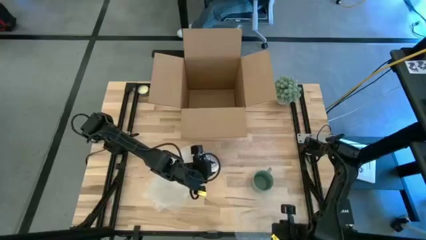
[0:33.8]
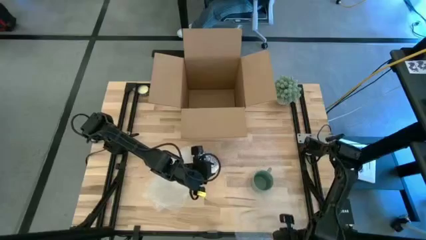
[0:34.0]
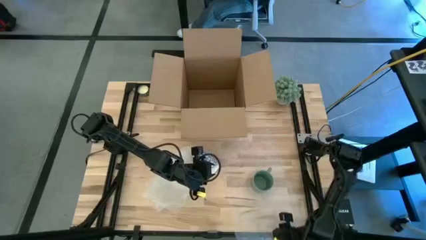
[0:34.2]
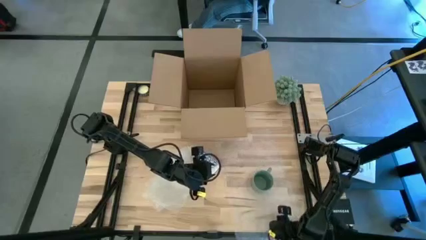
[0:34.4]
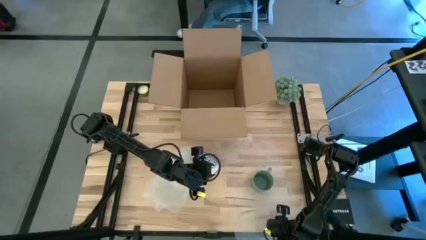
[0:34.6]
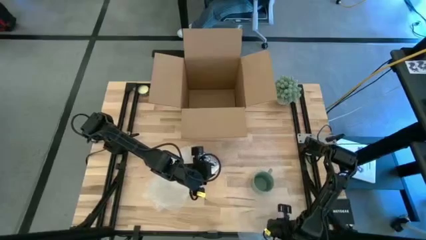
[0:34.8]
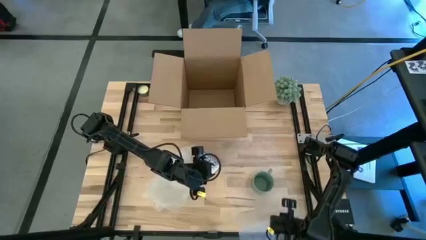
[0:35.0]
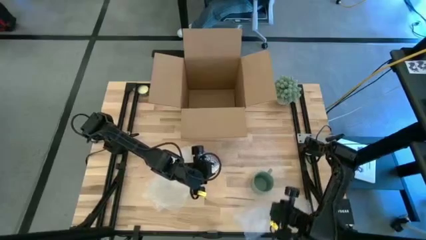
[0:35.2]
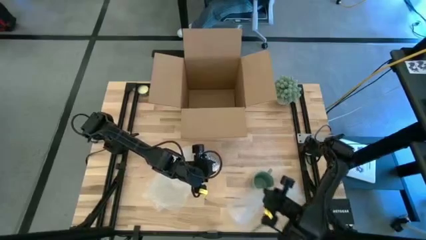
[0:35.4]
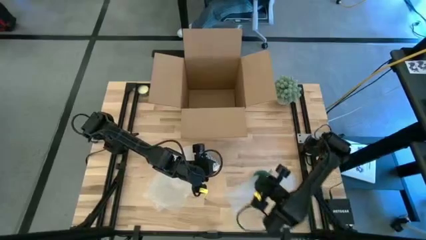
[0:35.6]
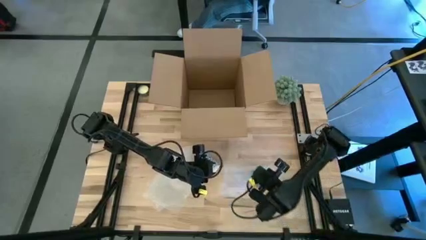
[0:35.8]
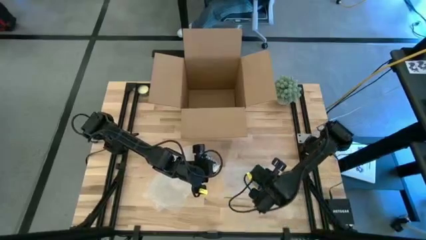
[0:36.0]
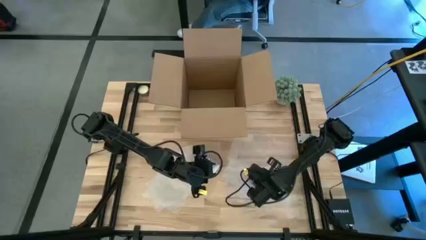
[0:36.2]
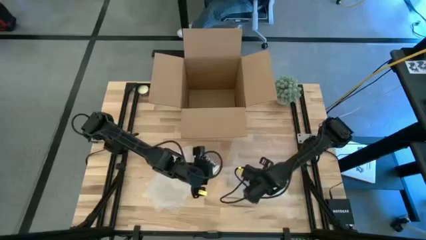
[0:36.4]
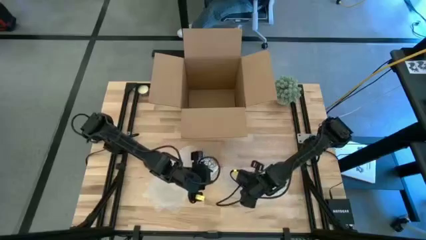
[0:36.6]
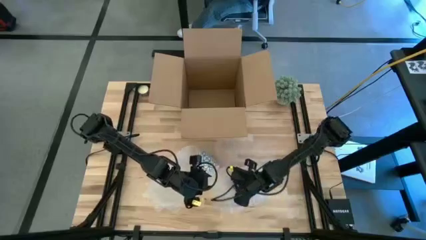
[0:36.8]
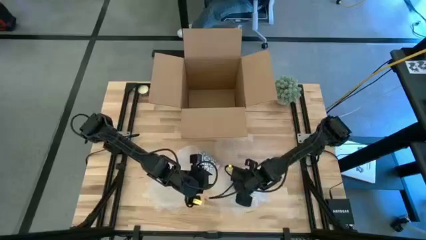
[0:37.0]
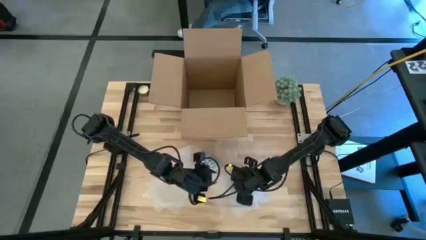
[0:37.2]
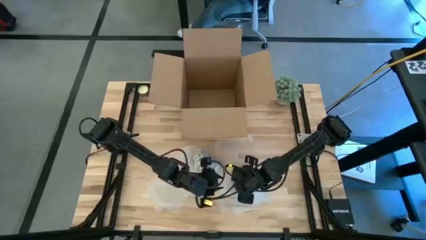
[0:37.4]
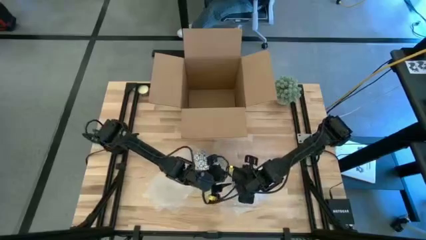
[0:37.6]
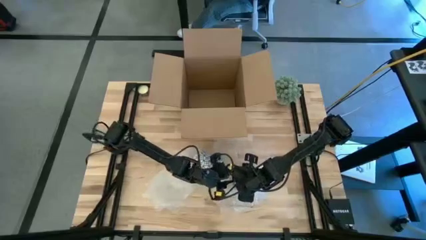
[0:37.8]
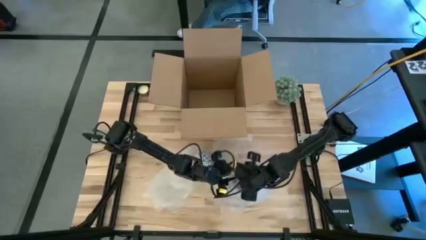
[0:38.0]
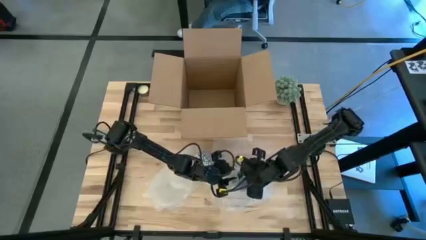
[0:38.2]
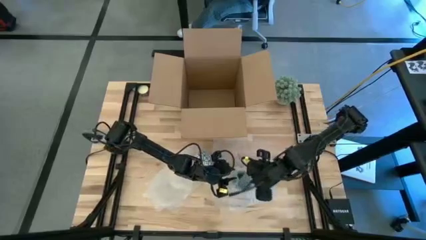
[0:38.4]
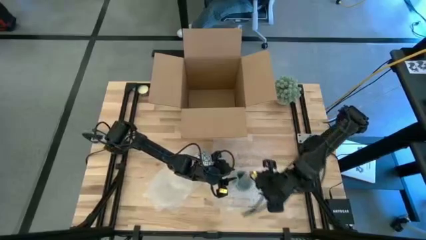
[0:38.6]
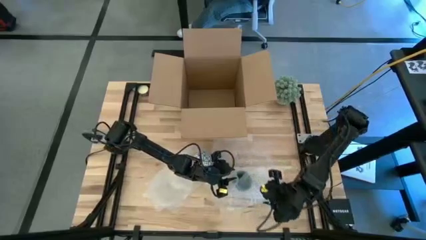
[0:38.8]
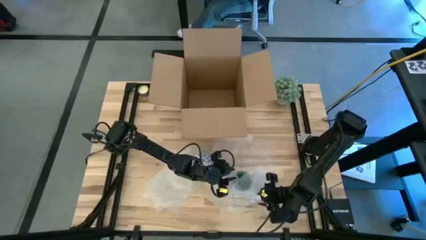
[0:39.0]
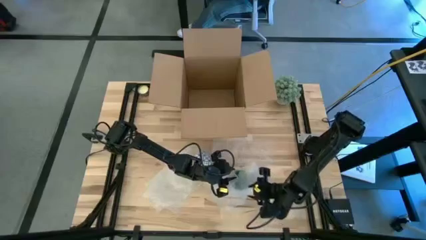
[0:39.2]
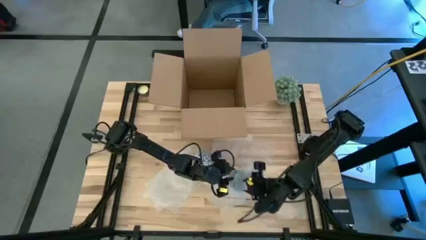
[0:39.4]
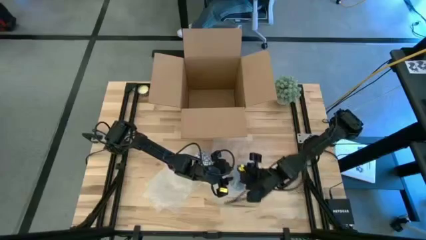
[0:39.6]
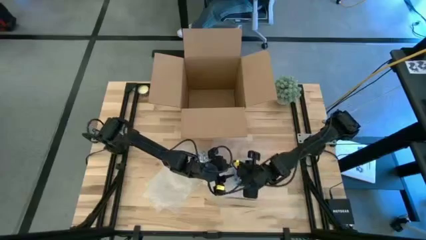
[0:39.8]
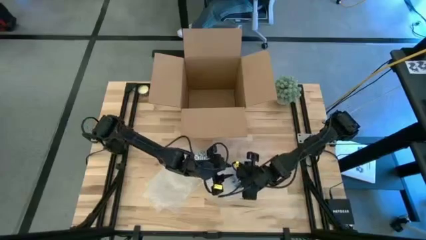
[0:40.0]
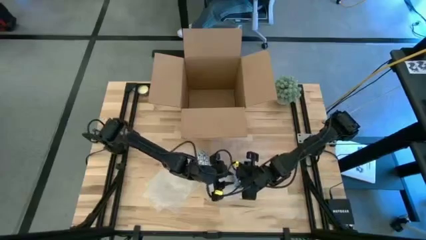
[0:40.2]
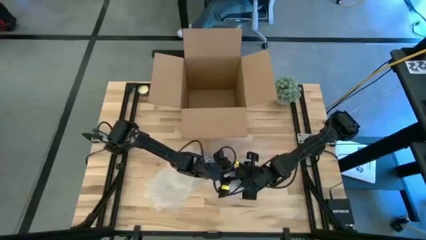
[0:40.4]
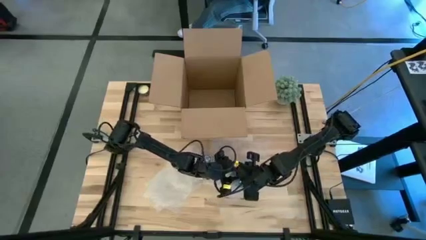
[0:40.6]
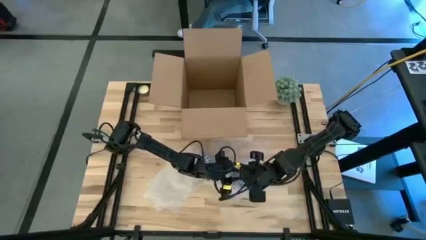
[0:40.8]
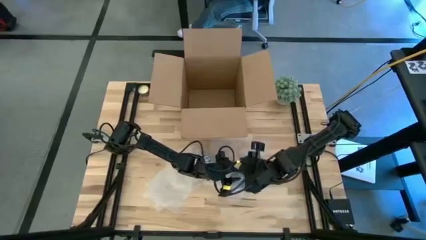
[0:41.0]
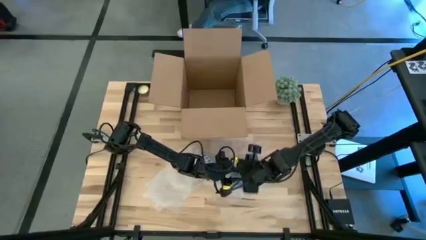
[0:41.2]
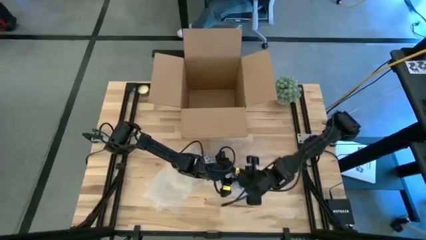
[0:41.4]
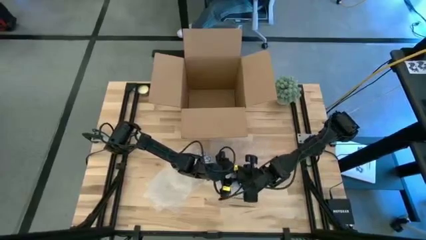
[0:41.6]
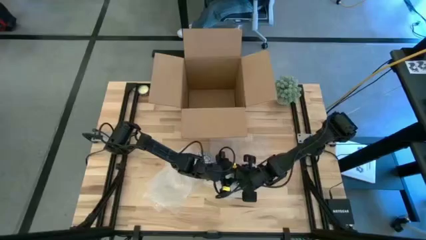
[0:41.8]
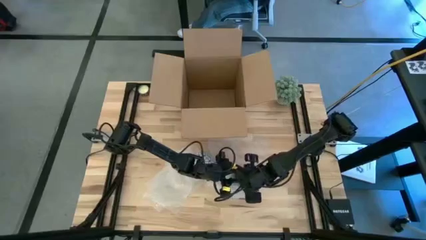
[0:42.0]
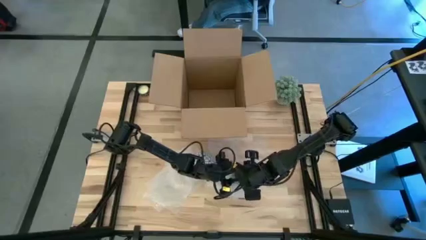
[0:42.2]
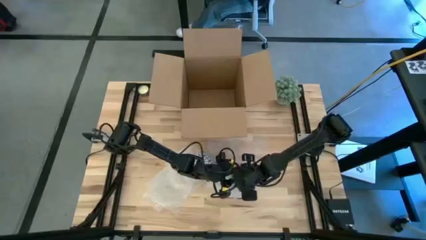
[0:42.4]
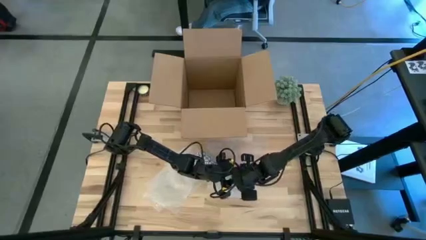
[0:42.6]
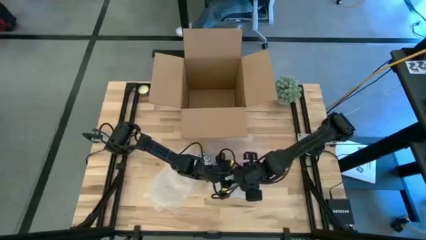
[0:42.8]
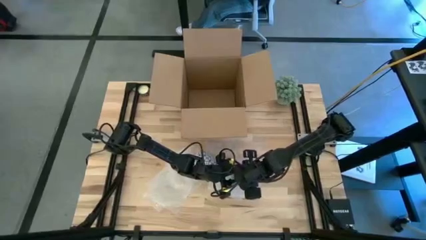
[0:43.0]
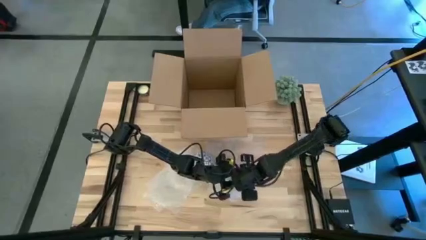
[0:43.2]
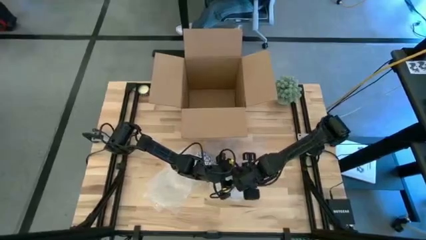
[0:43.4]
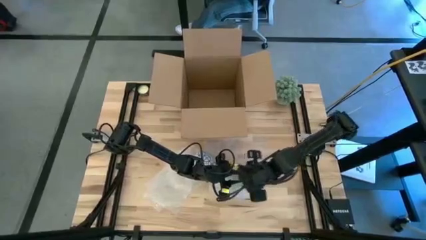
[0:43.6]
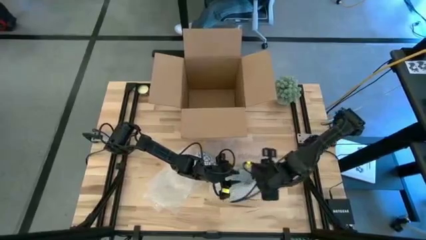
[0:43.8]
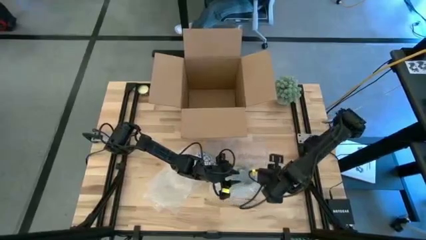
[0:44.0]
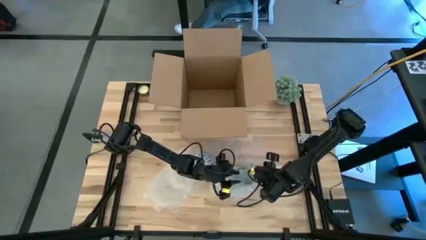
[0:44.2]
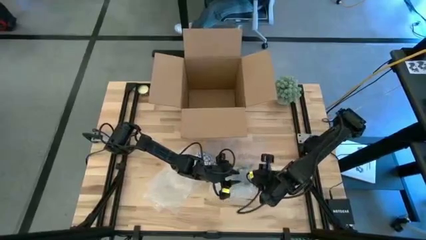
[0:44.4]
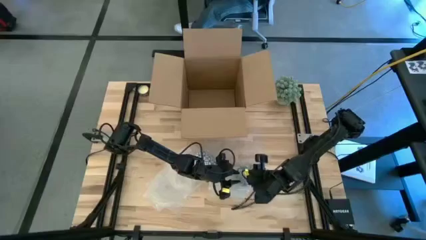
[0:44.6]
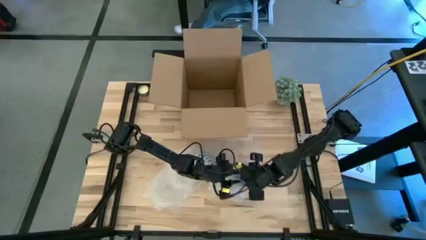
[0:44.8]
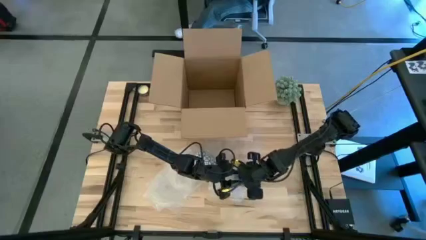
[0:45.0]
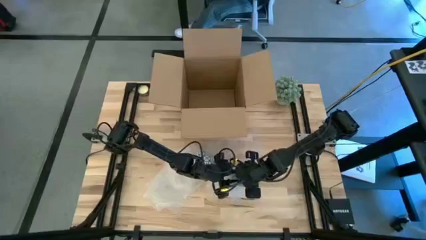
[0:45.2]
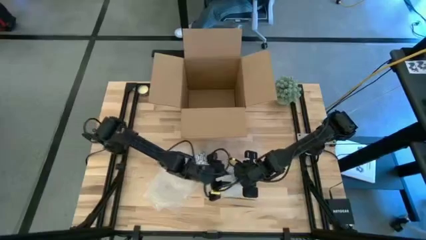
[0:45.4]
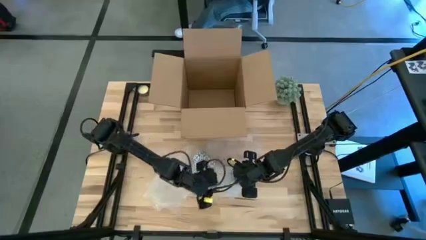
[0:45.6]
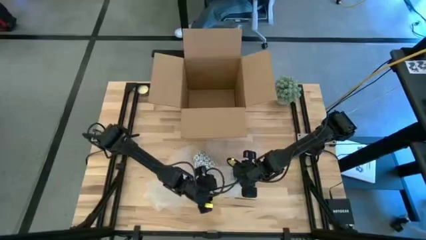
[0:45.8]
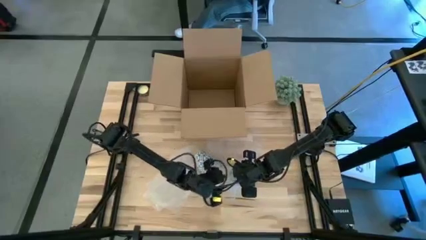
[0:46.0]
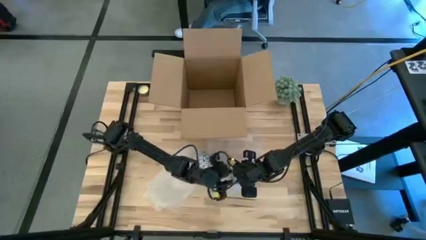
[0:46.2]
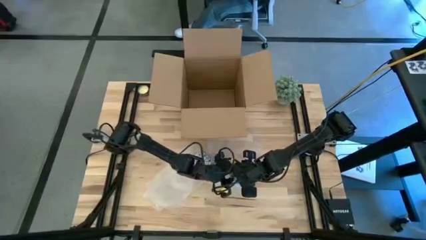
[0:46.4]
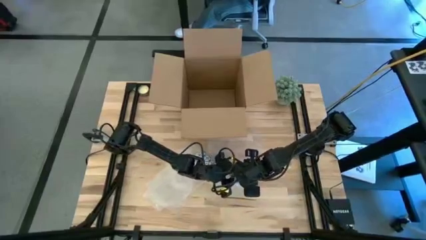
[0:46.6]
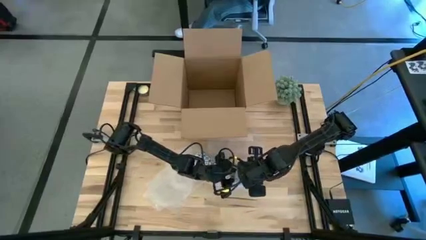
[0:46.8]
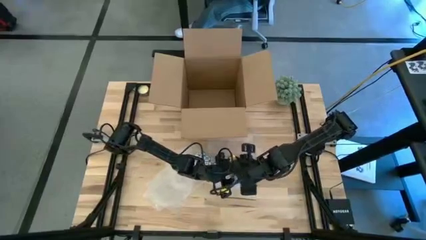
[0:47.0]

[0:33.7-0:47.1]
Task: wrap mug
Wrap the green mug with the right transparent bubble wrap

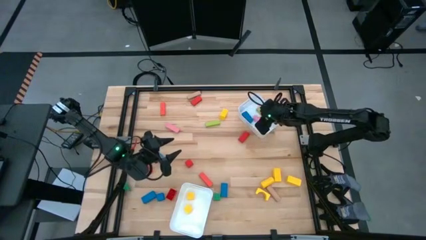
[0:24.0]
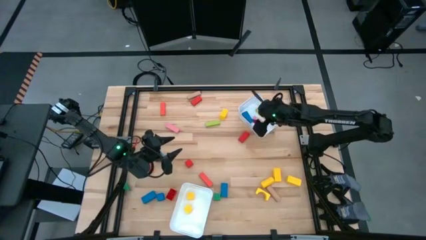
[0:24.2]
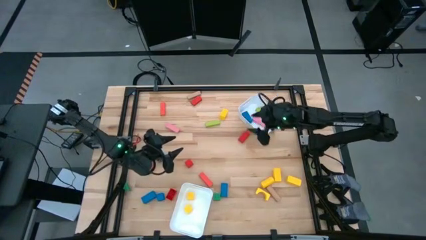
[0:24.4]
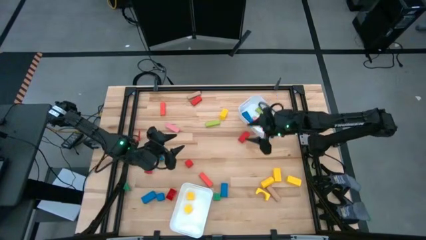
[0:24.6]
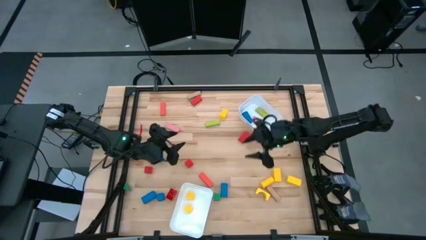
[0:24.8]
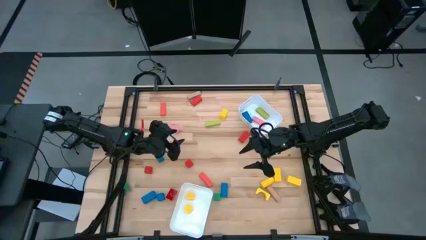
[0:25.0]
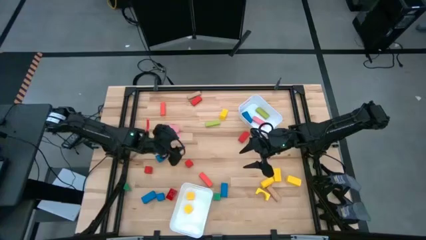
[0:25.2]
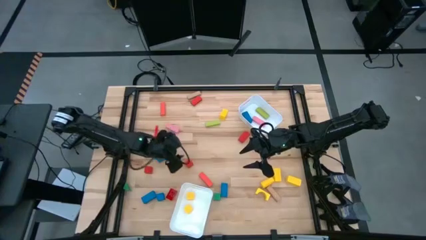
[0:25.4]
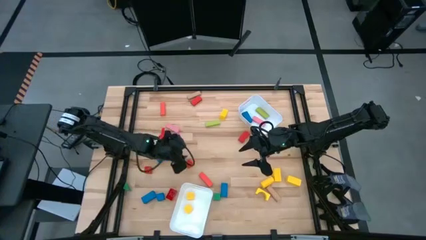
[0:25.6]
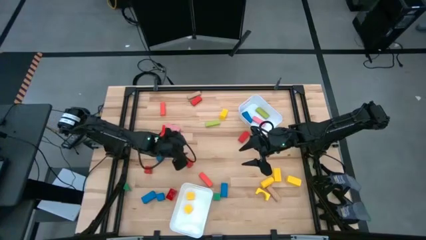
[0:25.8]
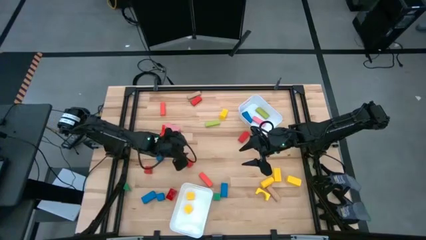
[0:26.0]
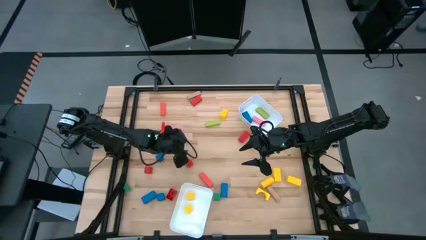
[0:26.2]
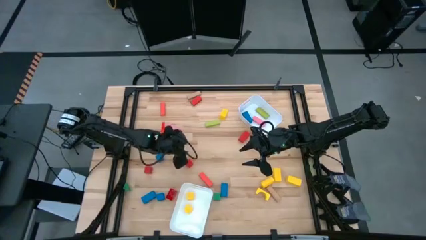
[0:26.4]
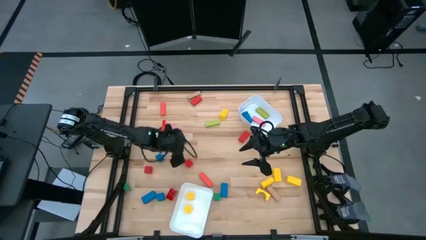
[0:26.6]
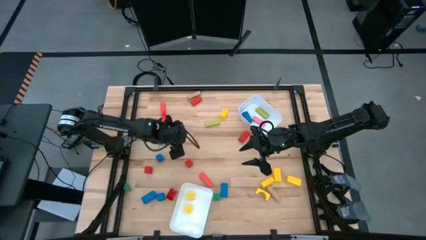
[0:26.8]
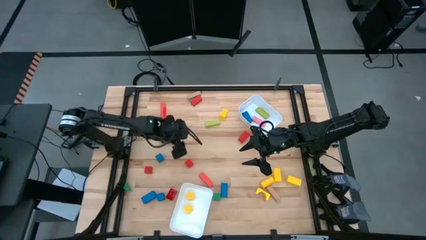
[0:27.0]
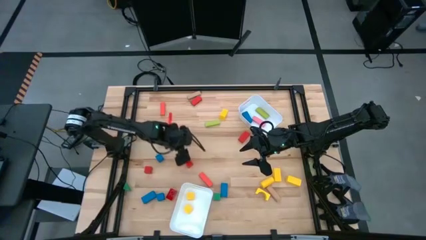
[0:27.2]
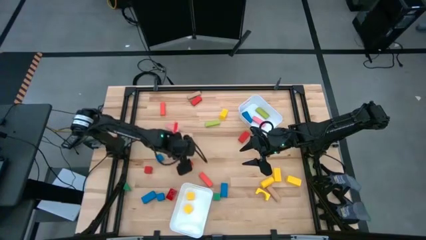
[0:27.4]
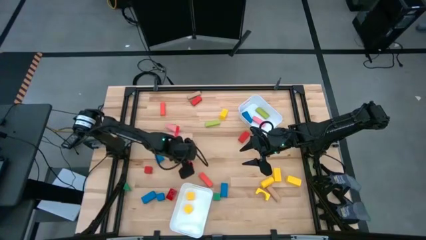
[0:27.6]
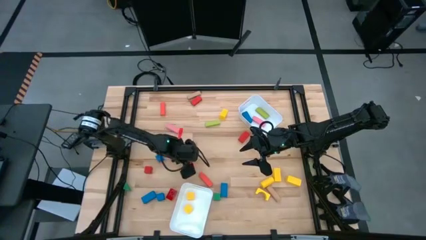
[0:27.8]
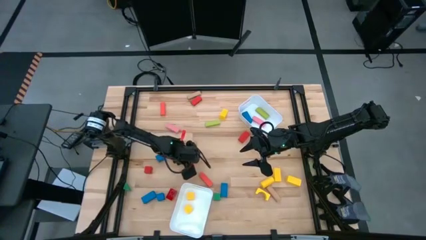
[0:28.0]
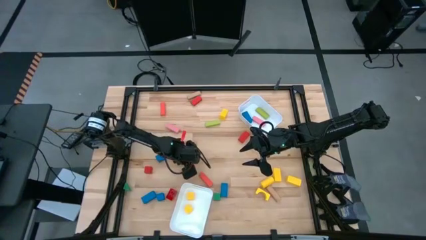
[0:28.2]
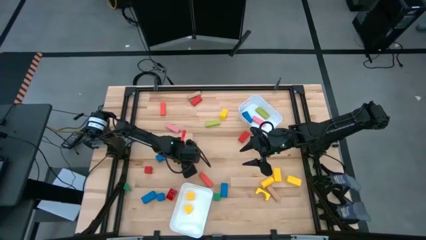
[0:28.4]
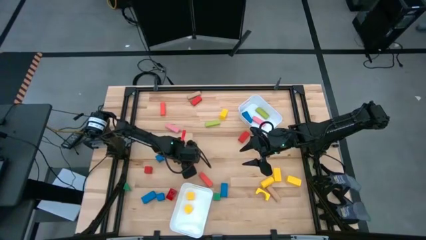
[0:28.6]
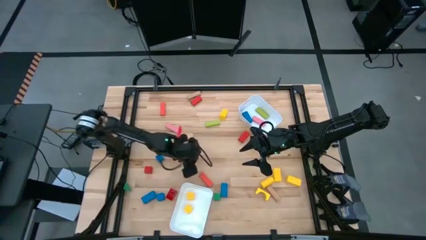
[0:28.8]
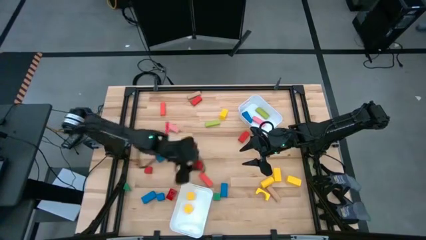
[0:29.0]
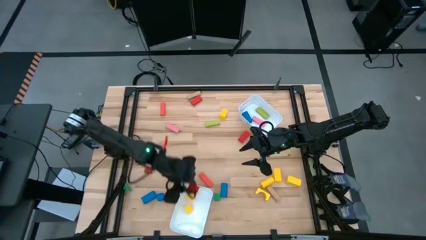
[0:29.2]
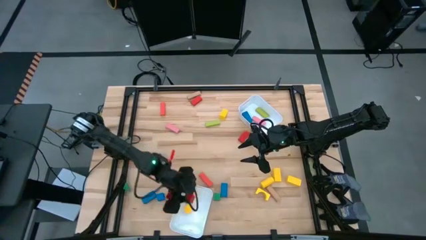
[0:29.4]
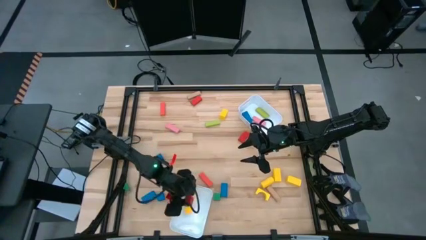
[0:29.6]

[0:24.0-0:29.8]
Task: Sort blocks by size
Put the red square block into the bottom white bin
